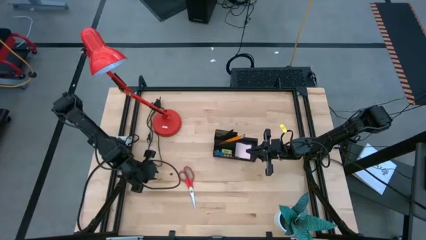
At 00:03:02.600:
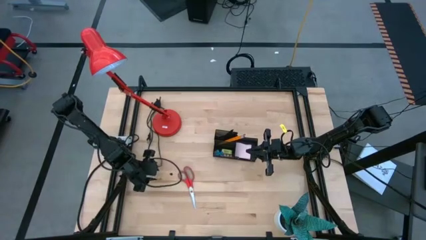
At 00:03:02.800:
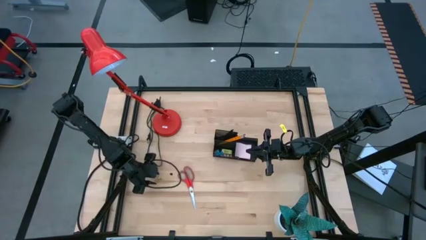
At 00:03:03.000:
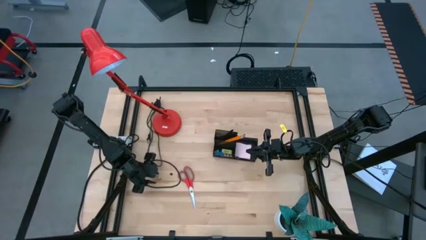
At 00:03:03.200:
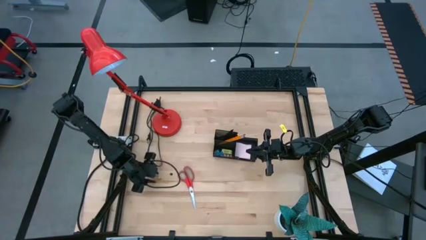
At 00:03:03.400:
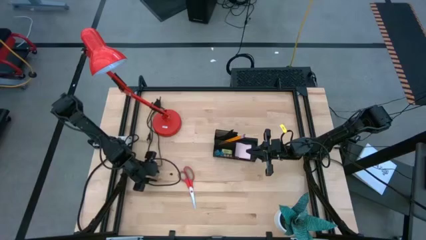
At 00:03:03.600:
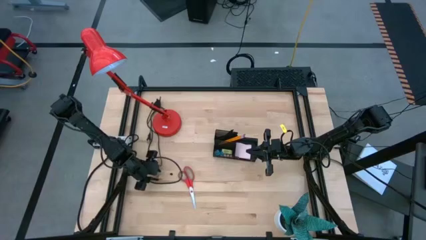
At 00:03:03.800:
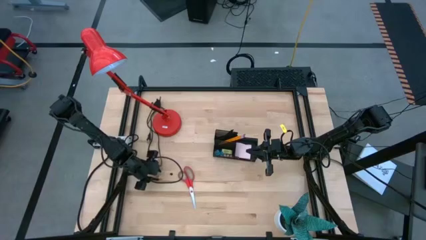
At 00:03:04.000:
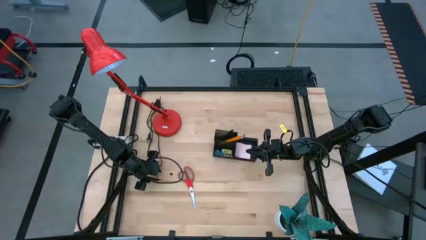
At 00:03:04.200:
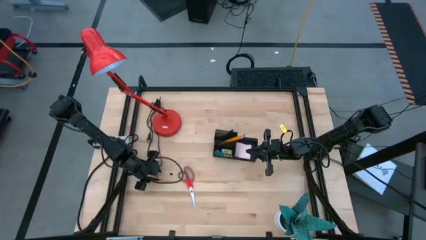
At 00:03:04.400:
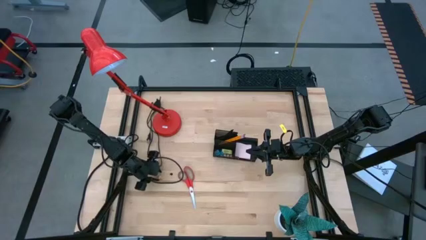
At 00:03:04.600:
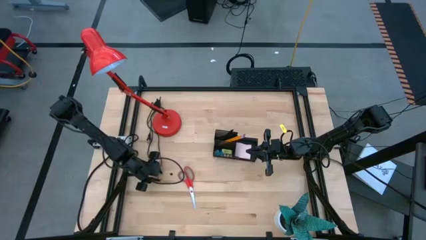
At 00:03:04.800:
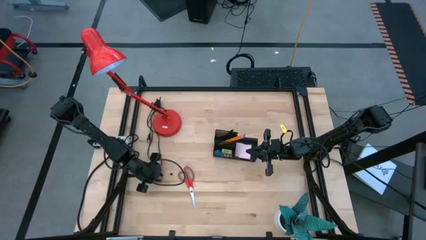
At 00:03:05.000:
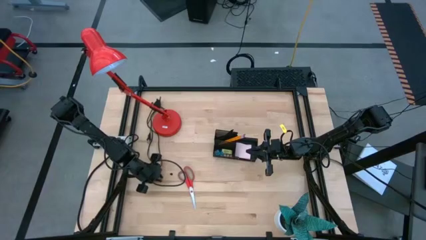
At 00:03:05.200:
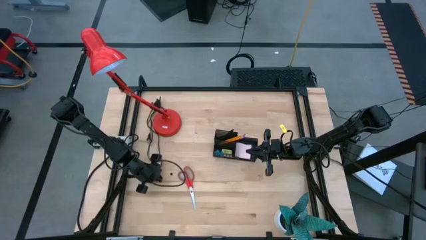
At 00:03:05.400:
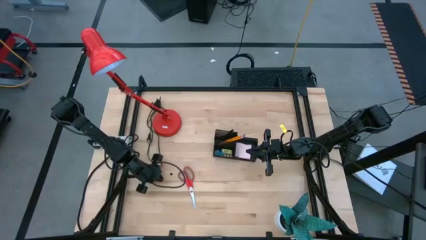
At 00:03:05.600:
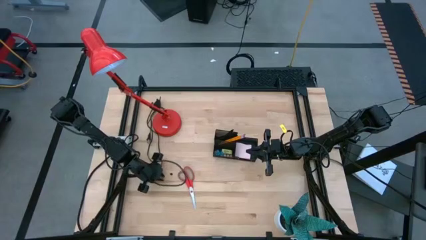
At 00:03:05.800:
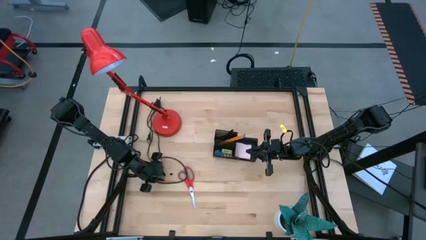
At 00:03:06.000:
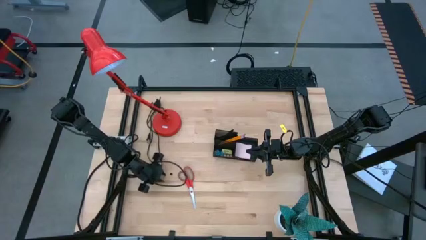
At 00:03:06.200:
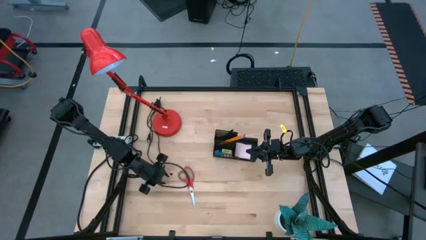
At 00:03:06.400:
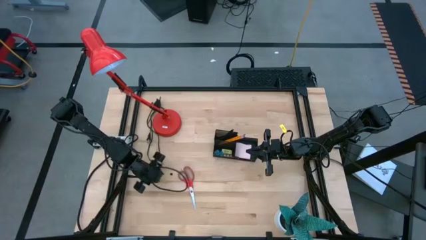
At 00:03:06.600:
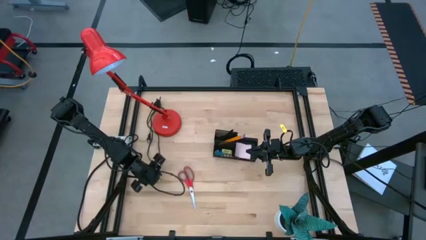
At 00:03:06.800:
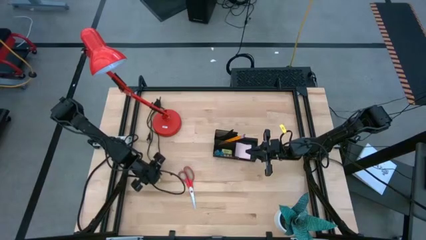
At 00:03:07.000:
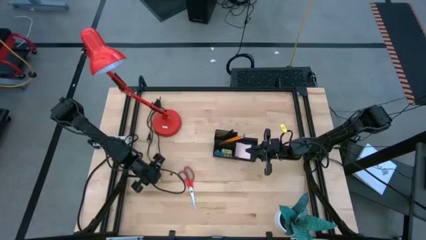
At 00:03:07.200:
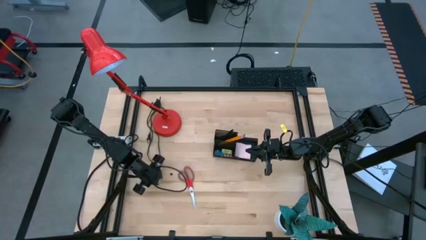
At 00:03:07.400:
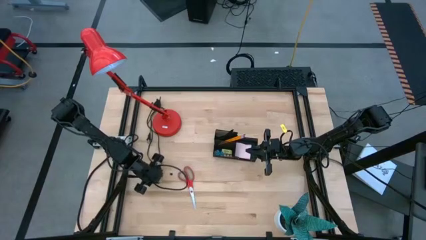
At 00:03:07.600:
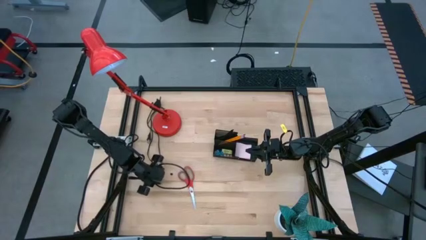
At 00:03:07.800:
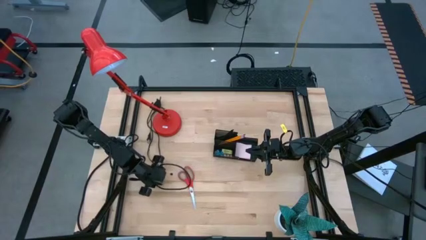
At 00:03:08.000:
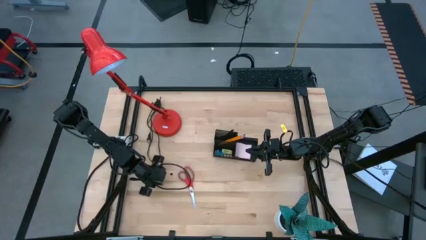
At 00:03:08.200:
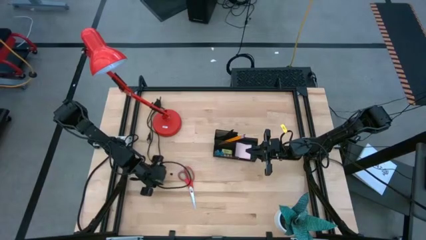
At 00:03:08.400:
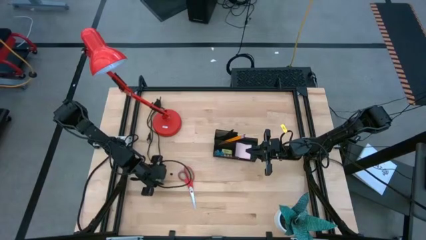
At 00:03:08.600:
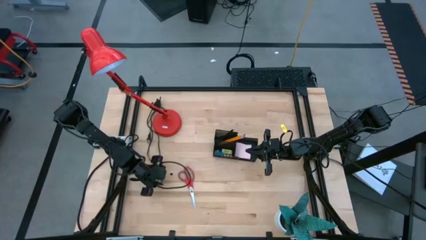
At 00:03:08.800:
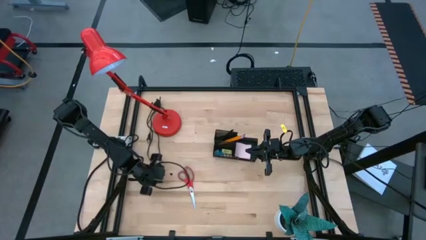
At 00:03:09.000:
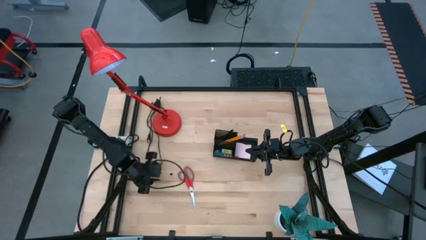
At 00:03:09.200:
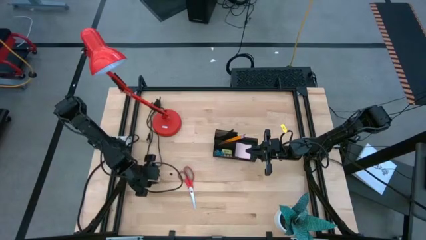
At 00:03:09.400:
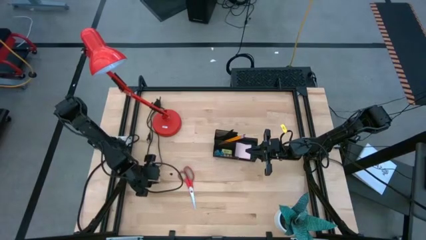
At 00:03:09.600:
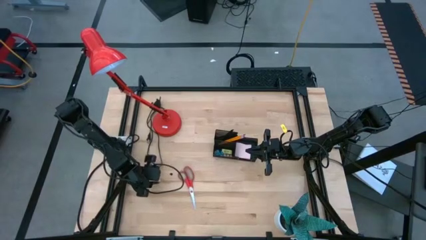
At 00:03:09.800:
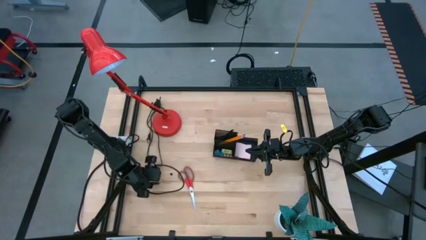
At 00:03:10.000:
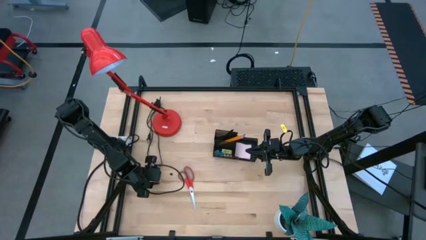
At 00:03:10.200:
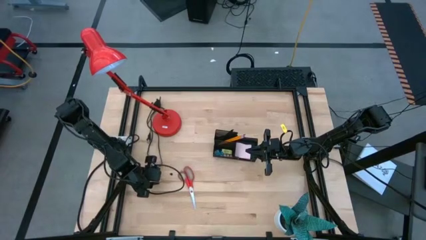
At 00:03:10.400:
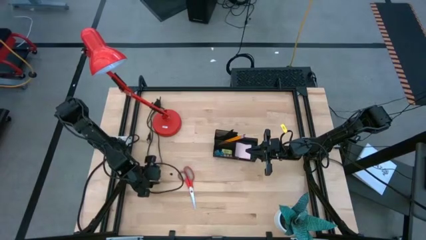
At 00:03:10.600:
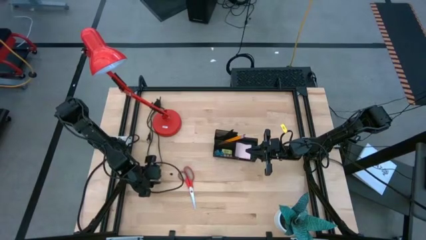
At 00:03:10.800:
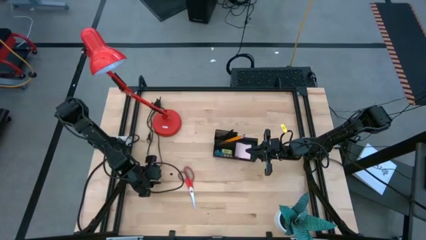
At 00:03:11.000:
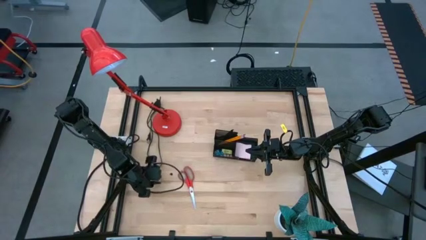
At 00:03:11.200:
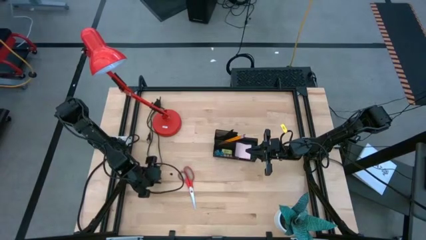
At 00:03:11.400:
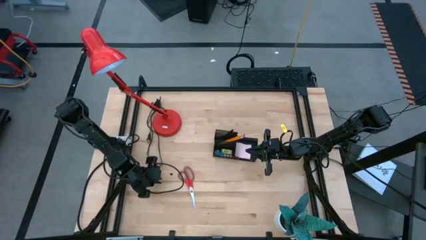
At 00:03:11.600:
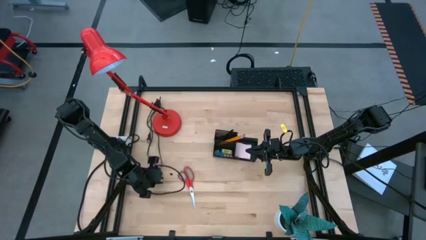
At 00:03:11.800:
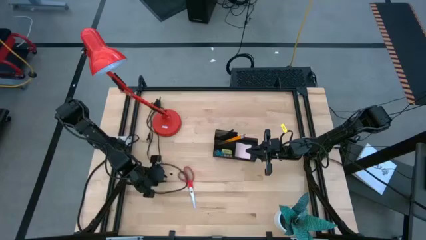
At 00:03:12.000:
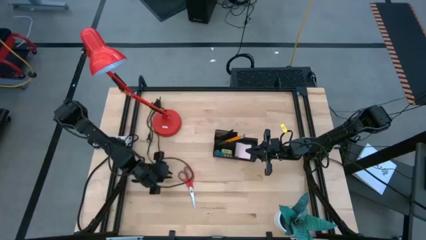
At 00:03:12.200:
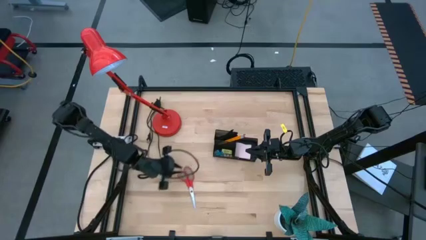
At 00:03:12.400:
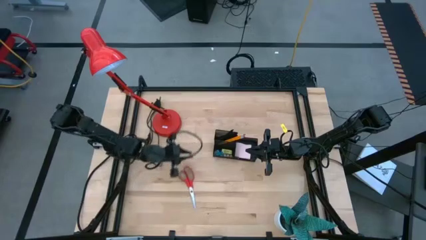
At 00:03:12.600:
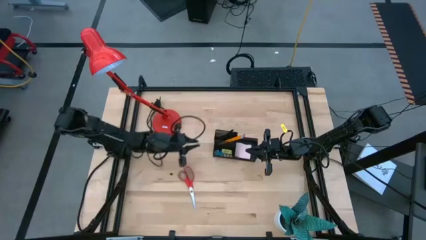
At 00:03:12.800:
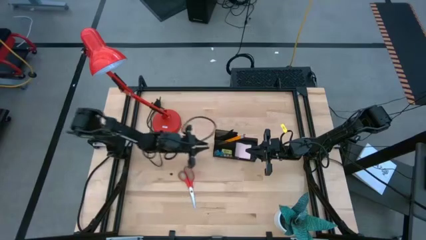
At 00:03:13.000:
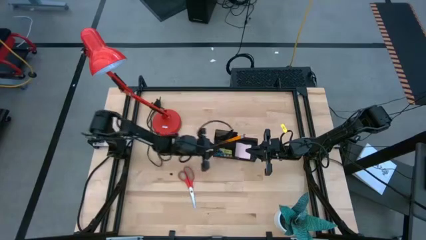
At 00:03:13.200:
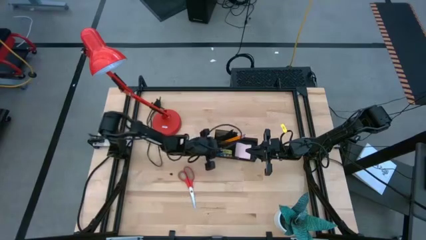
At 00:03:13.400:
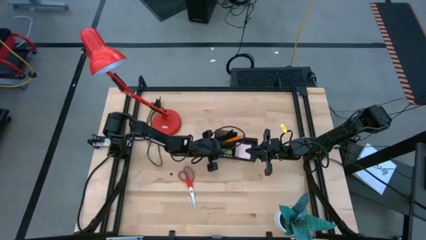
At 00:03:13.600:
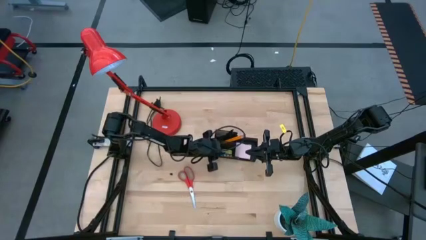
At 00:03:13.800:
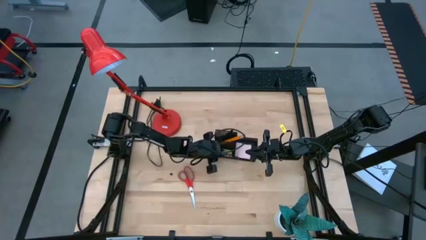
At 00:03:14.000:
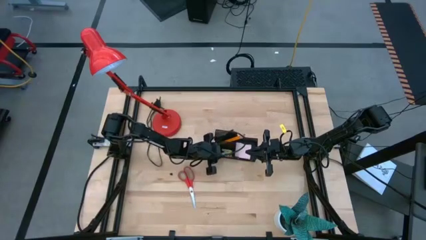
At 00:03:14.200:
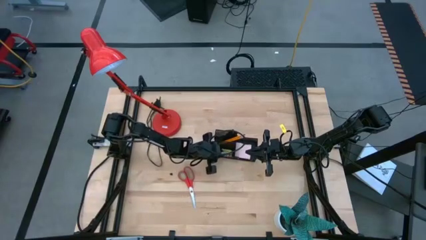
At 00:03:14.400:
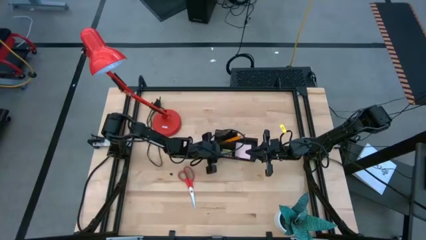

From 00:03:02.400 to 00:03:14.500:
Task: Pick and place office supplies into organizer
Put the green binder clip into the black desk organizer

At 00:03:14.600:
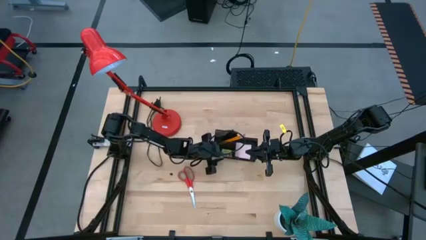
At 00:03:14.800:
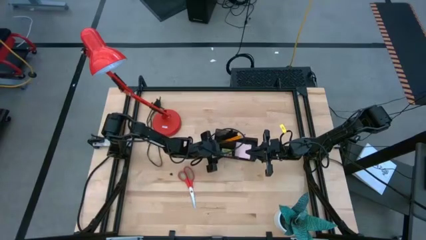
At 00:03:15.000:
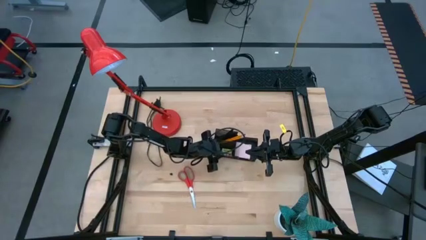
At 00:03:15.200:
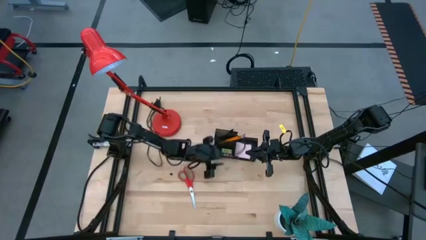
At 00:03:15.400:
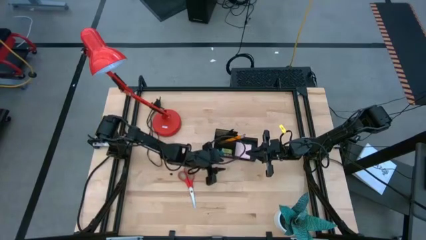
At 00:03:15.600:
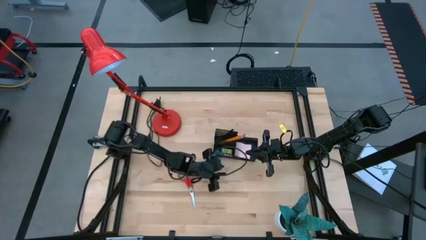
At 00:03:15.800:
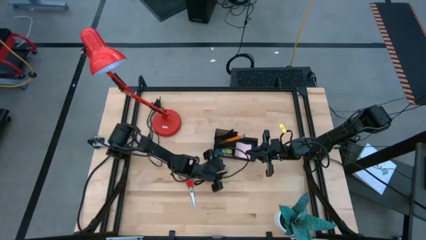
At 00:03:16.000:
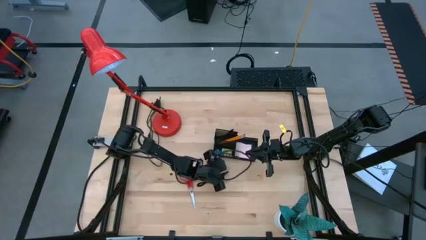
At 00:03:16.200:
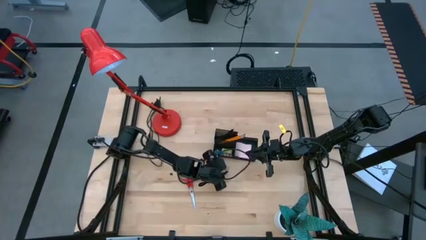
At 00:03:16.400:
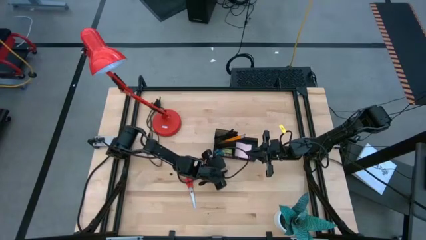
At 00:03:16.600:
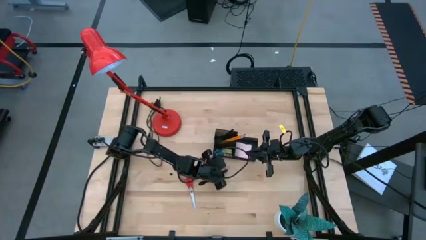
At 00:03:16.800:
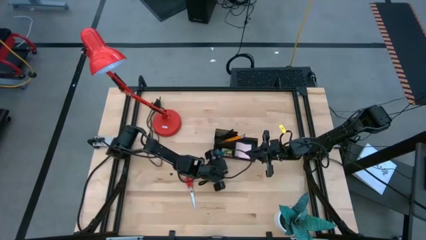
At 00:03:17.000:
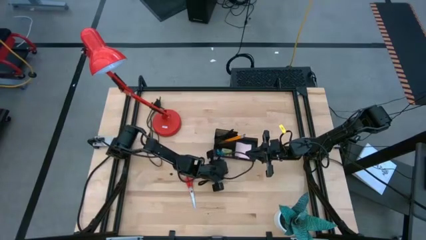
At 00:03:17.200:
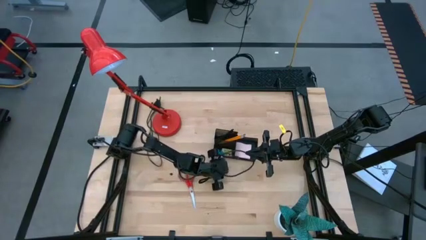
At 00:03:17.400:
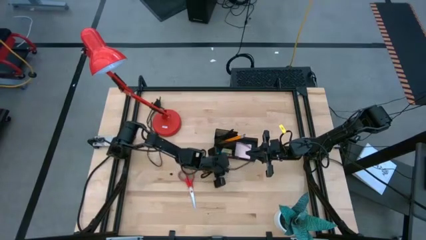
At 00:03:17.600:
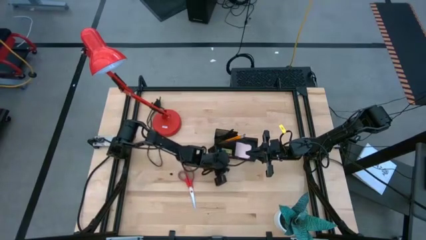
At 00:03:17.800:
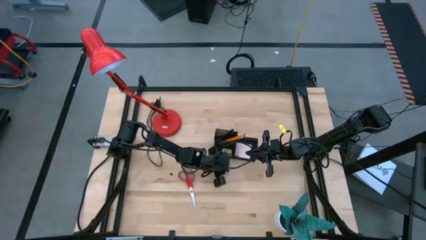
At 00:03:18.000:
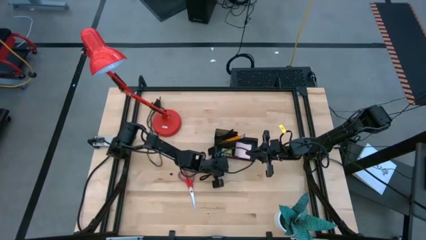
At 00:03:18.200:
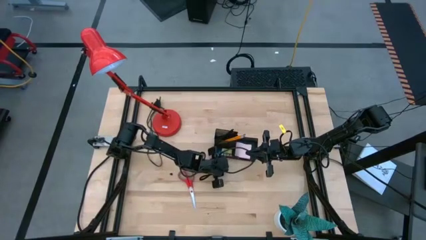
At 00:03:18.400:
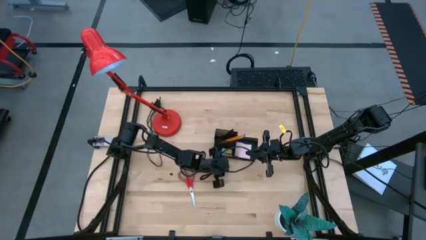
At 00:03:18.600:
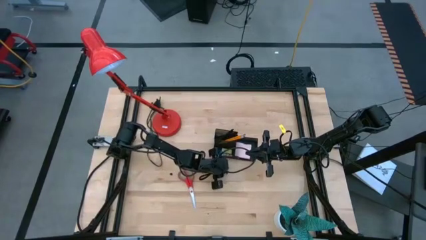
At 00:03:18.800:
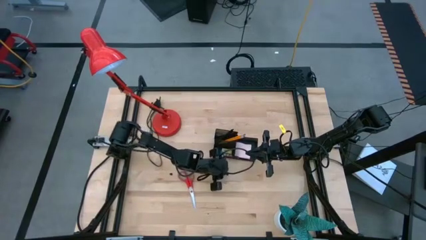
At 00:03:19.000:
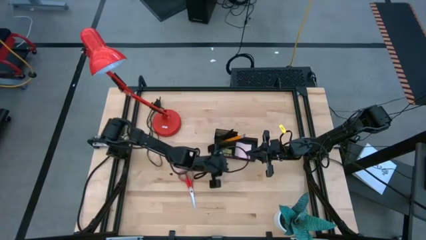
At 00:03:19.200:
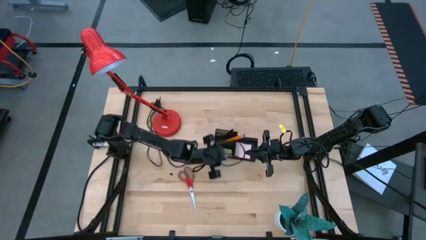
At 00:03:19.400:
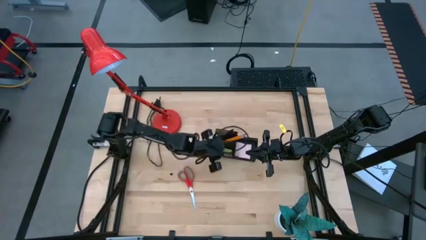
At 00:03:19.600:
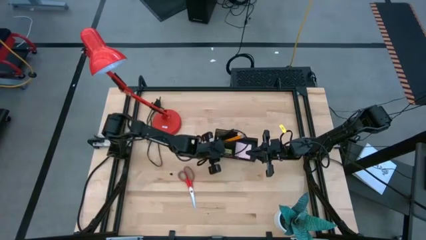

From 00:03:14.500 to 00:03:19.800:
Put the green binder clip into the black desk organizer
